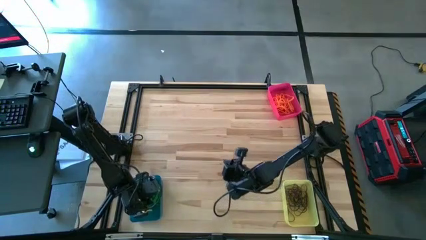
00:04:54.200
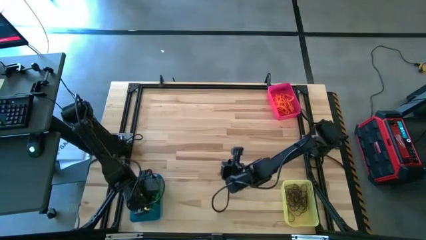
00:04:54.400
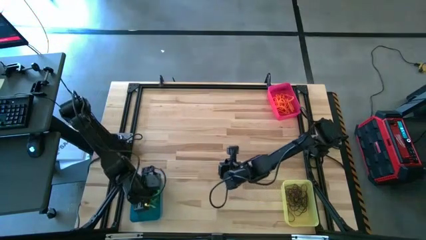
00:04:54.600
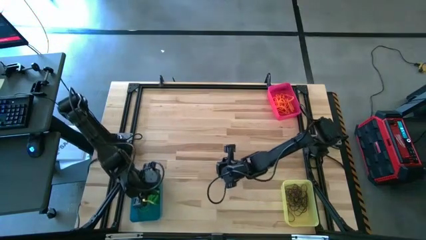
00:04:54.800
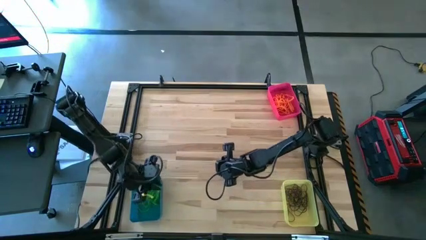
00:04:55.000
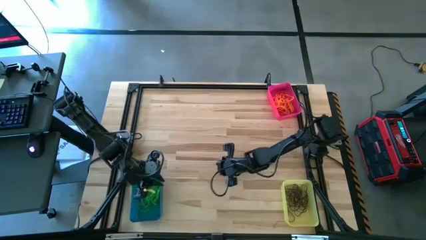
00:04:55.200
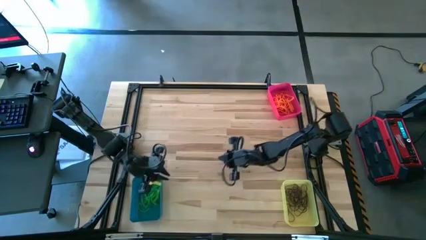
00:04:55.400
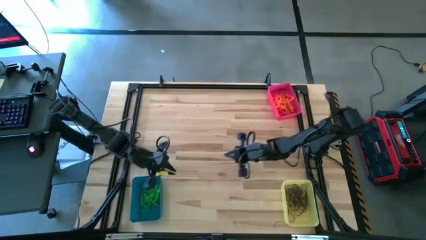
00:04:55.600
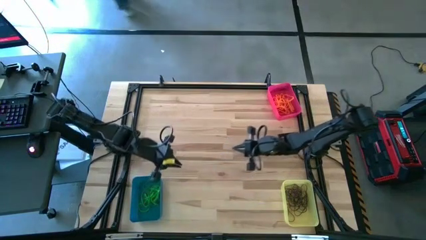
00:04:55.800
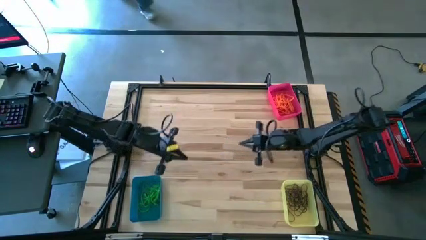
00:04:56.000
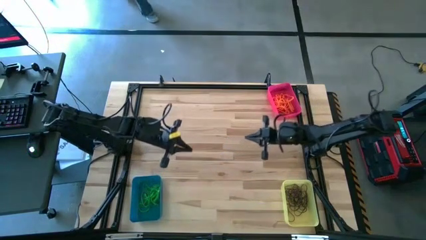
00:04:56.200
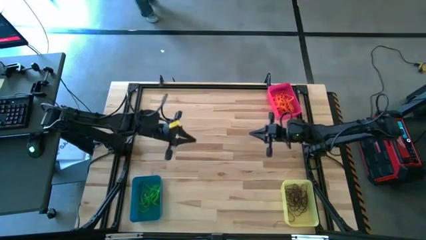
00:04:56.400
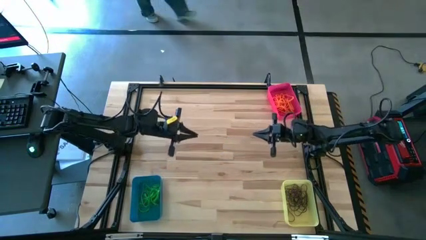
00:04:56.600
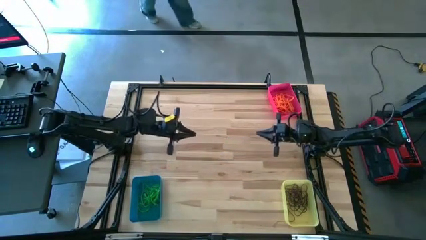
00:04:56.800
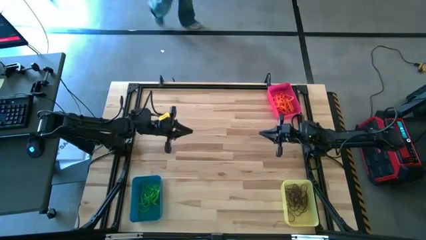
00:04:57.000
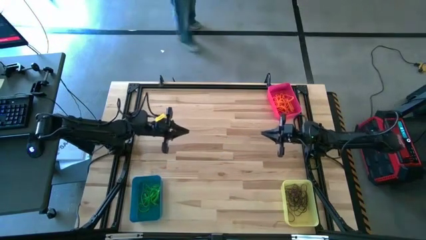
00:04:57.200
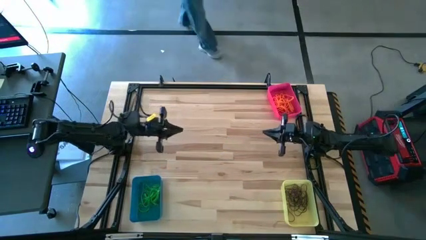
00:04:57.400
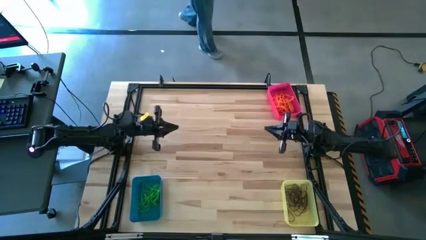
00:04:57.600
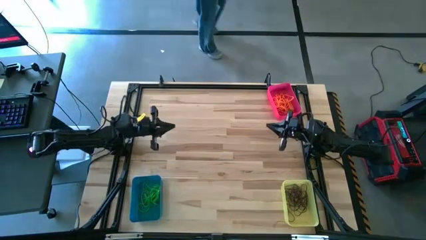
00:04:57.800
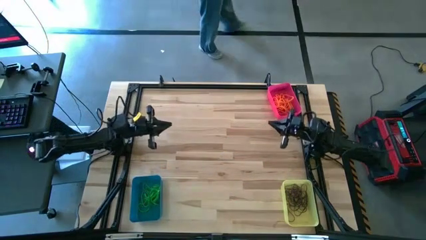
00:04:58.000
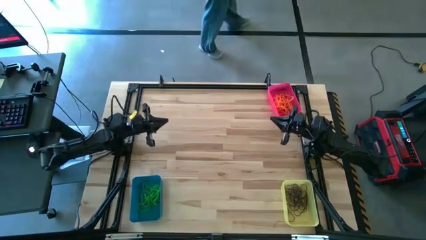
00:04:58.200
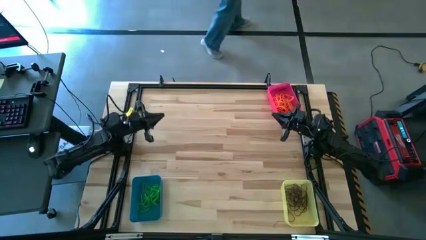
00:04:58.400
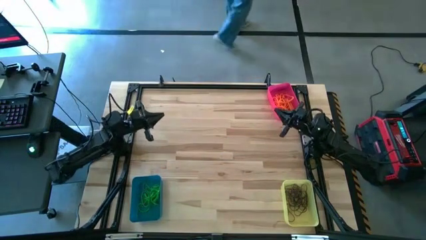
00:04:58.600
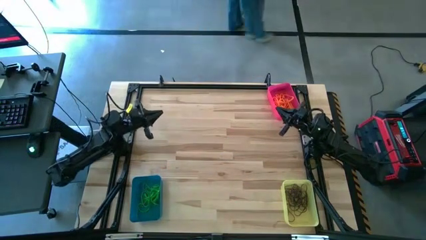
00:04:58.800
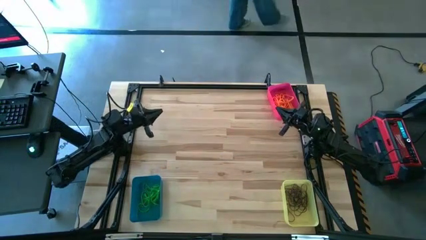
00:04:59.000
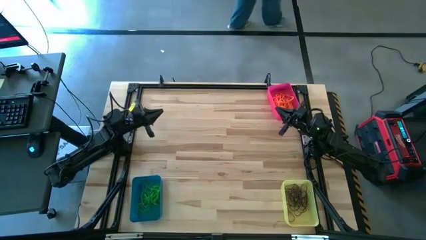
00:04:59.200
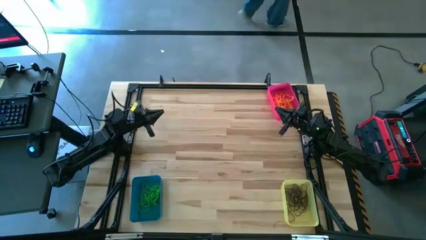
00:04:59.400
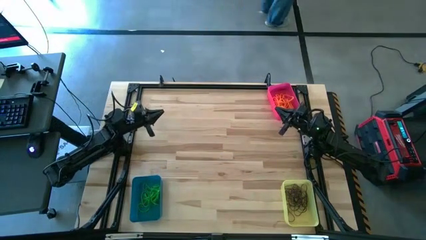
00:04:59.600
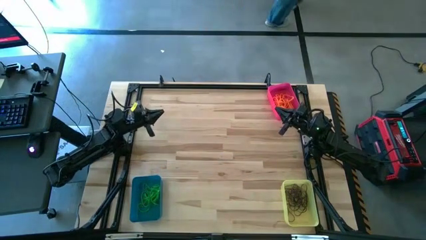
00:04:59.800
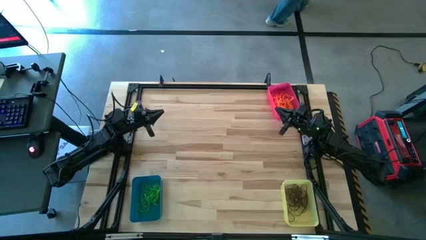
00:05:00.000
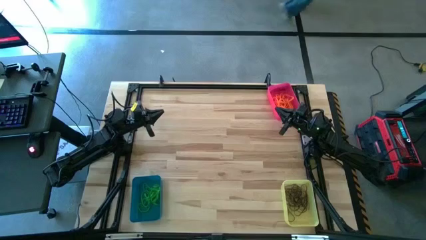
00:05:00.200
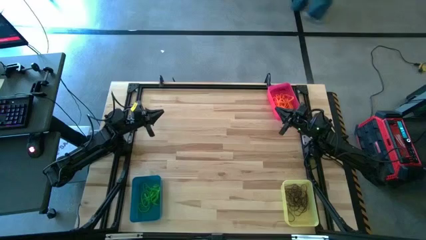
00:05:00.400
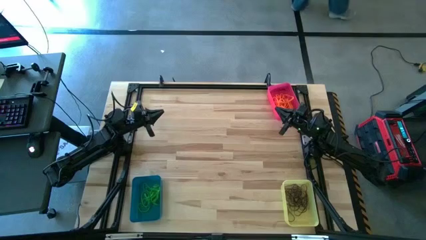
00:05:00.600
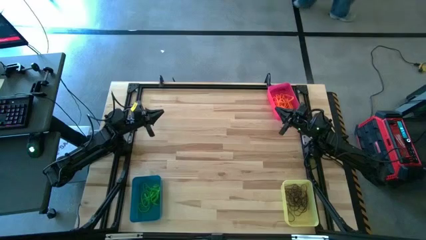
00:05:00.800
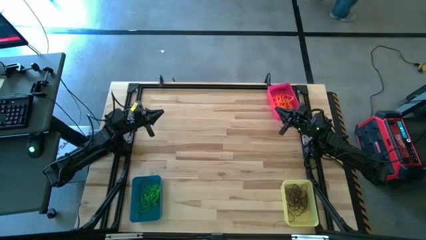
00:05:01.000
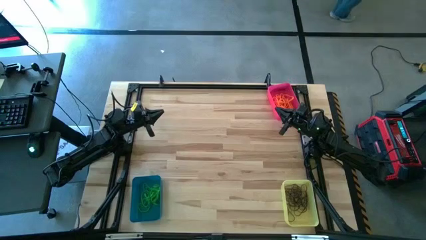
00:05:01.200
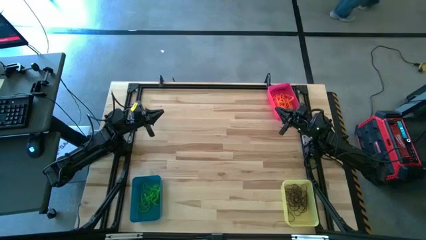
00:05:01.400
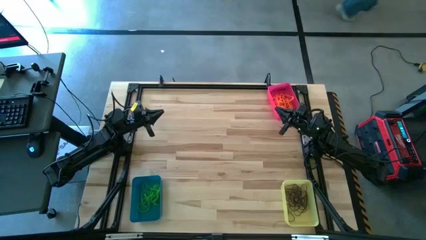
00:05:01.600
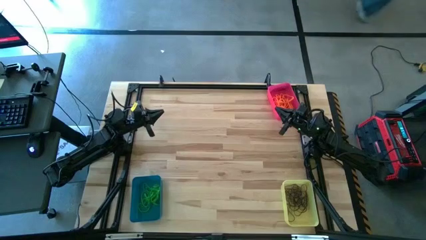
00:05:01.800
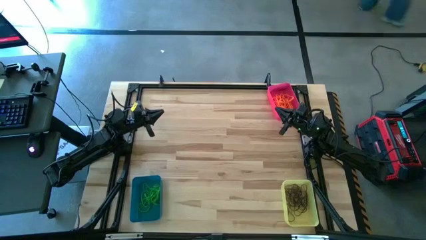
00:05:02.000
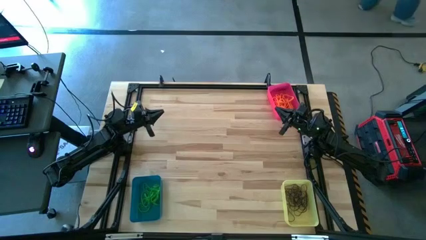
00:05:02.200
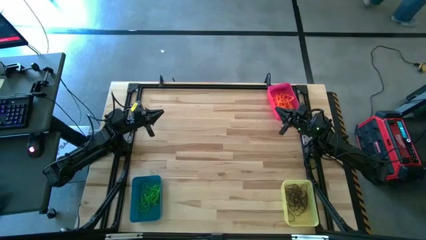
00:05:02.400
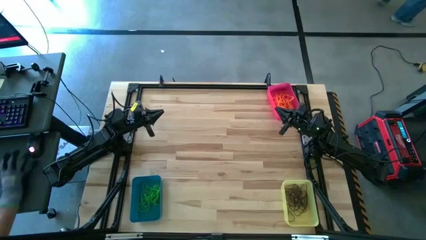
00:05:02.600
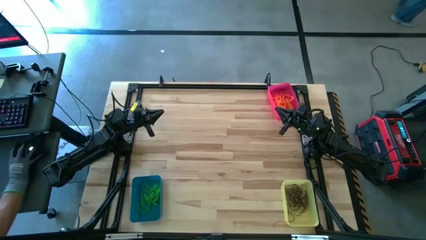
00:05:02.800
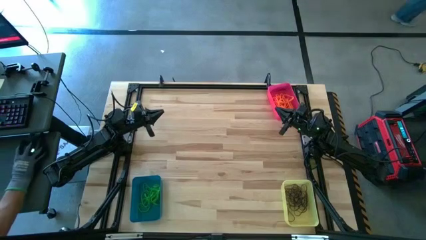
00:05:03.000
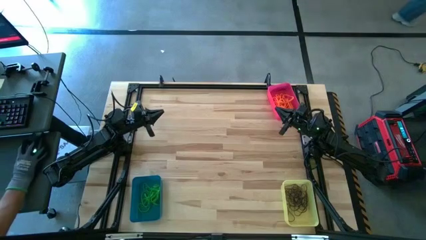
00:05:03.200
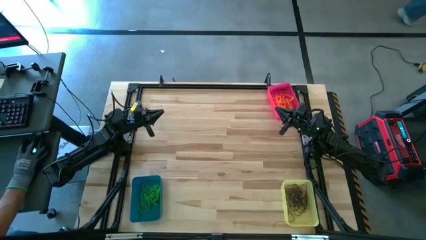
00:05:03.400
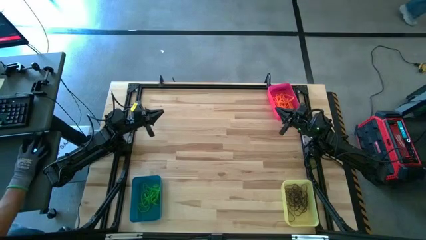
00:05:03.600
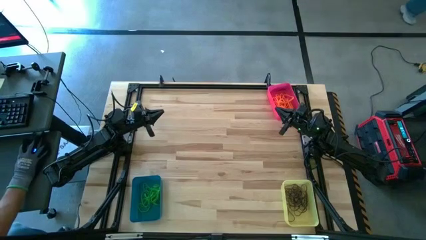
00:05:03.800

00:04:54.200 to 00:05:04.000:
Task: Sort rubber bands into baskets
Return to Home Position

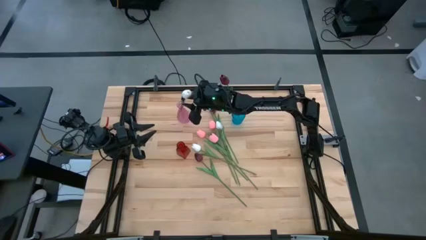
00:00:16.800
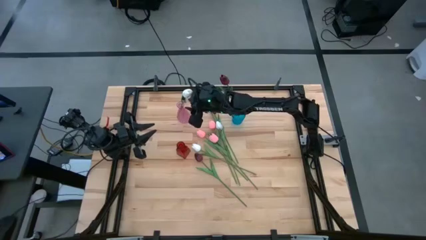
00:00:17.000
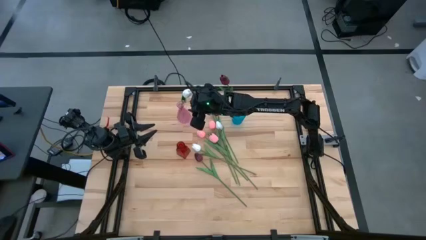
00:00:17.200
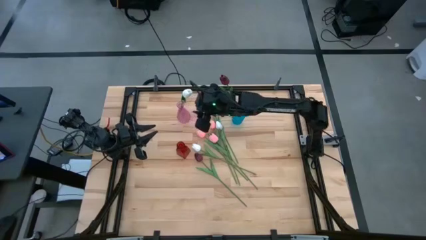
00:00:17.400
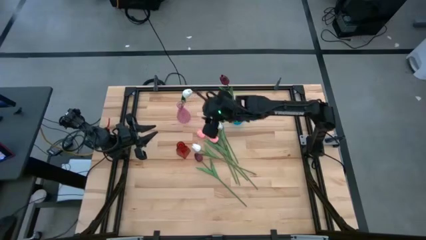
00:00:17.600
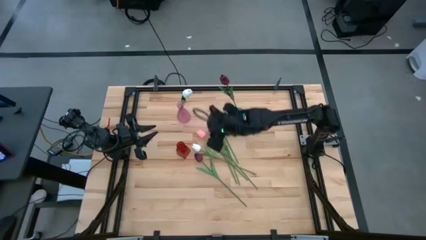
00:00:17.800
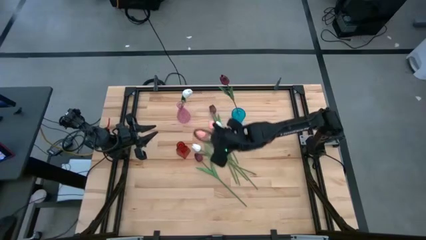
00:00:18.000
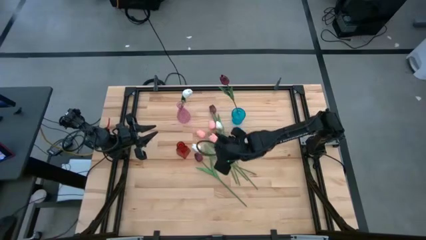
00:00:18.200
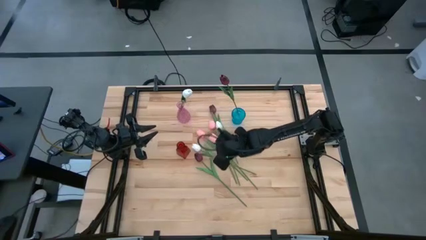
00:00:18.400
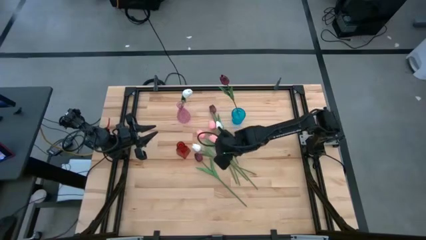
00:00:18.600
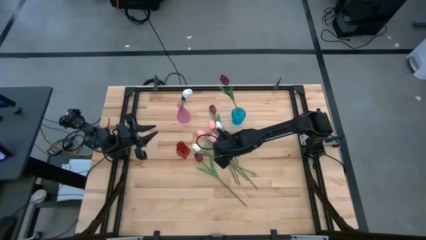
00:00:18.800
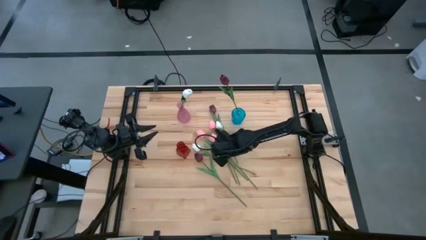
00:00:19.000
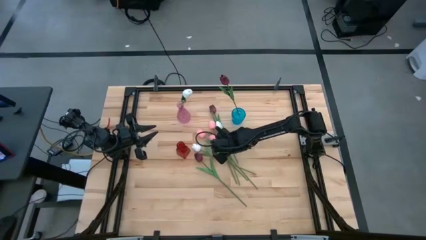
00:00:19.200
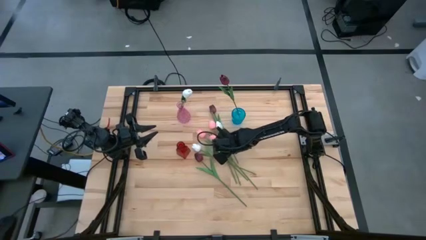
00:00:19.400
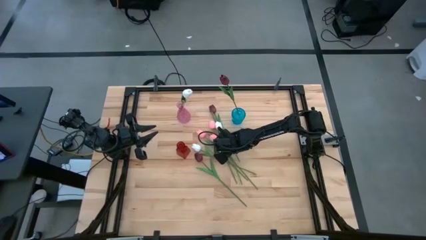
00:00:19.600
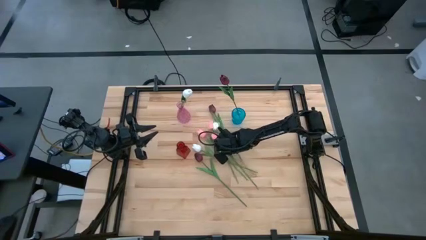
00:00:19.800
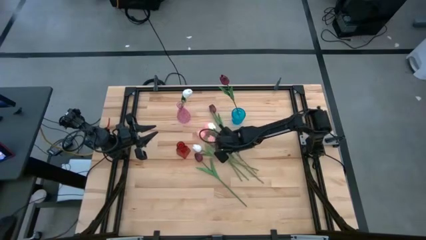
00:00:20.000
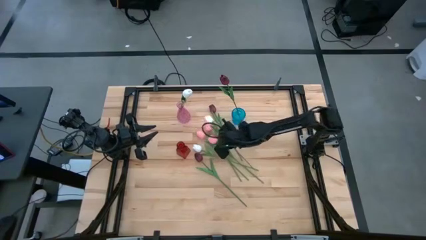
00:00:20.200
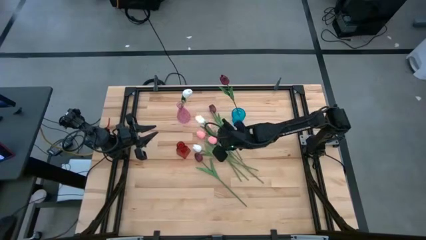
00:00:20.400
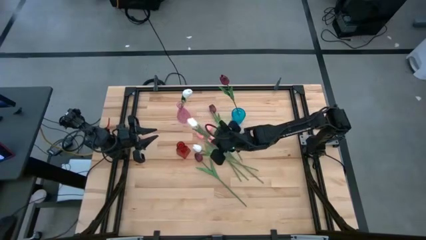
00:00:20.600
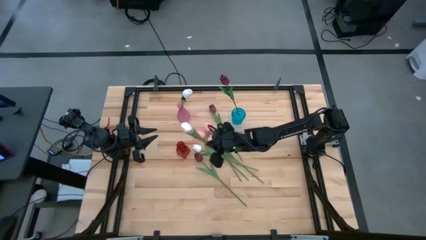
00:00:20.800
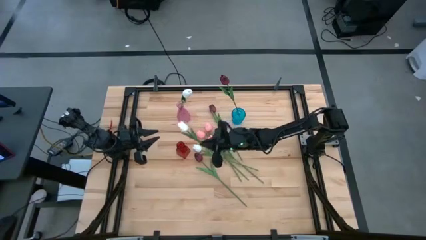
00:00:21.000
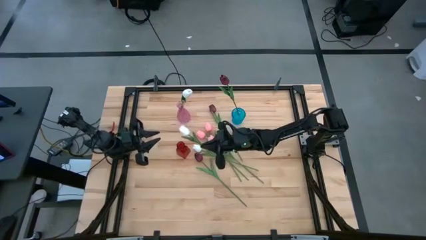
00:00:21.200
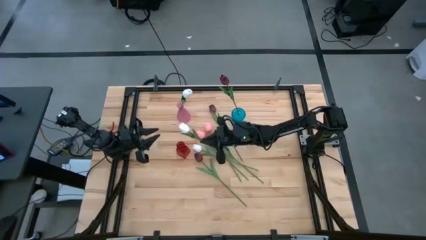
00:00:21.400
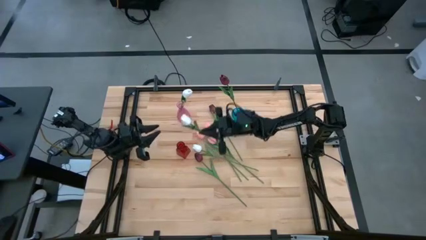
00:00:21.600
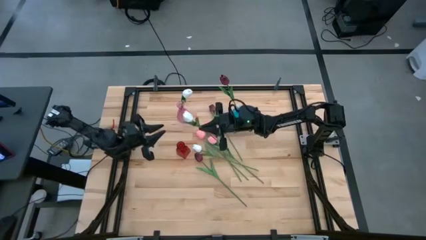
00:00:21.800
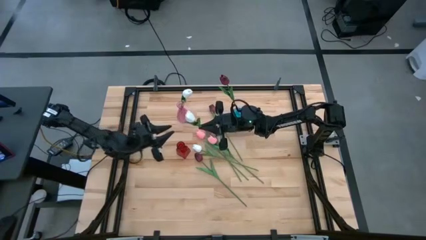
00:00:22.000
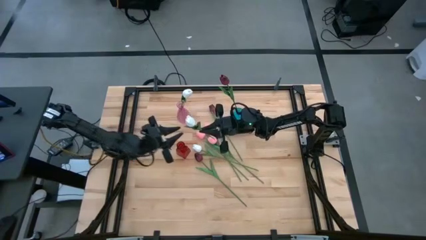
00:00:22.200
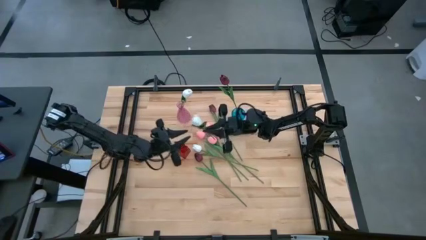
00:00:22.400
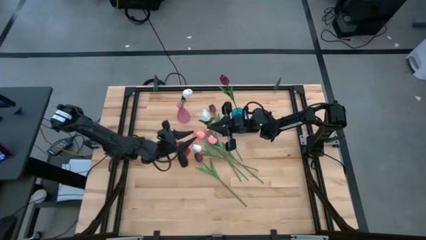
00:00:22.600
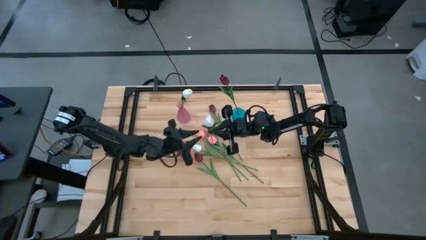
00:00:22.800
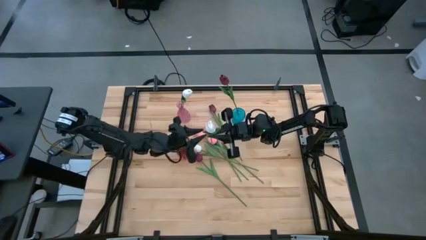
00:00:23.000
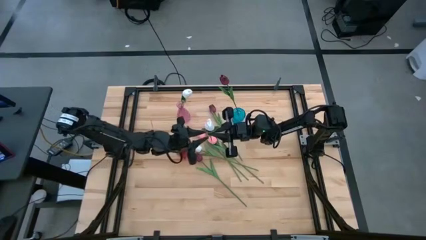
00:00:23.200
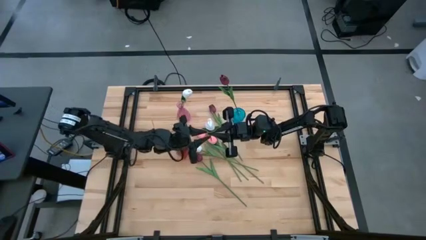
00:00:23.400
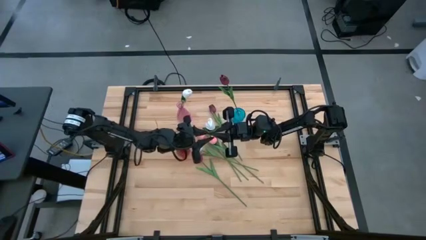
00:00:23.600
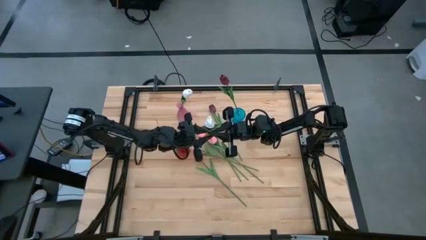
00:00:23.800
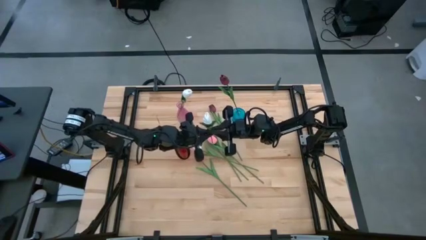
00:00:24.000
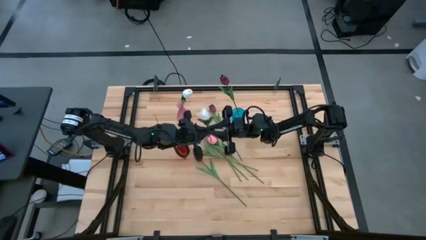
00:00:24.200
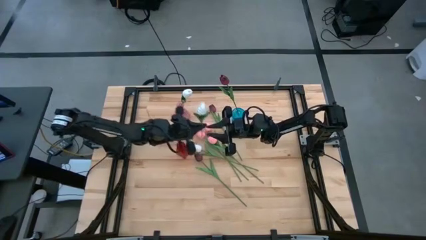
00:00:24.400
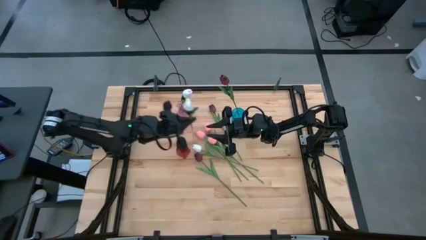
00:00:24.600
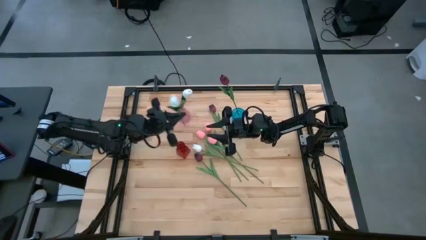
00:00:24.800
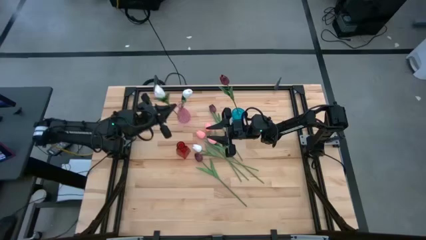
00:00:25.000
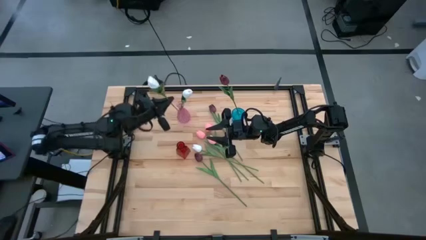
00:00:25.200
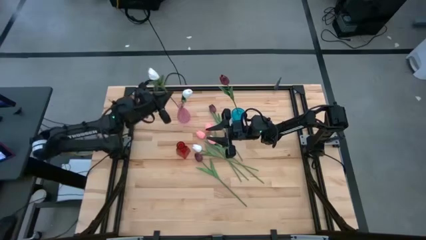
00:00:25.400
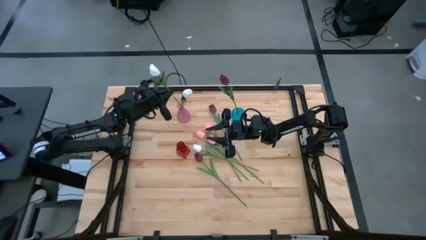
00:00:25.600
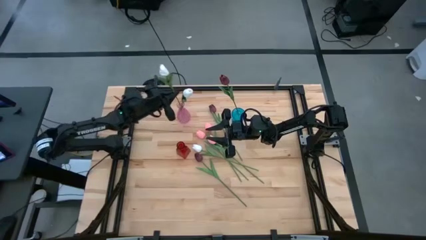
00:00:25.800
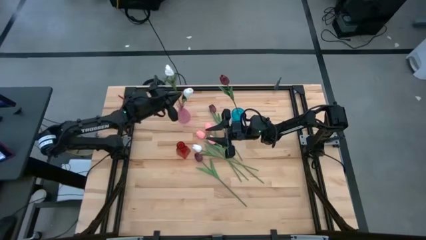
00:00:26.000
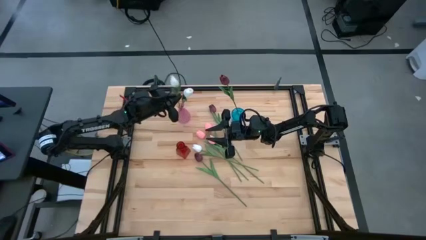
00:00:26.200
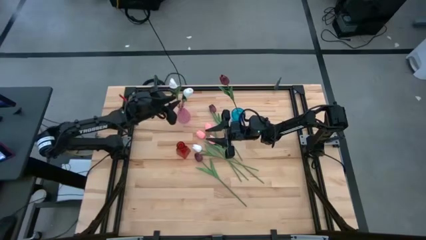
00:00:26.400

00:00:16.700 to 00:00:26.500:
Task: Sort flowers into vase by color
Put the top white flower into the pink vase
